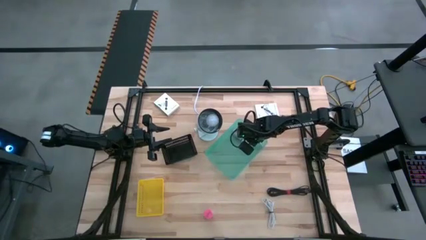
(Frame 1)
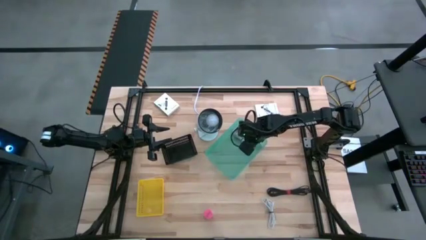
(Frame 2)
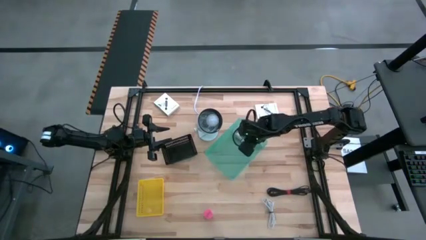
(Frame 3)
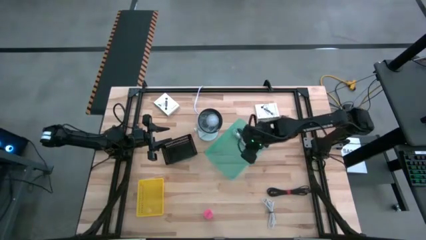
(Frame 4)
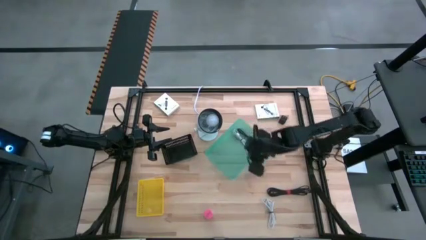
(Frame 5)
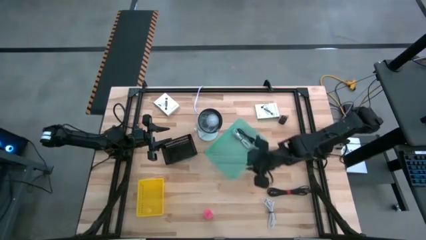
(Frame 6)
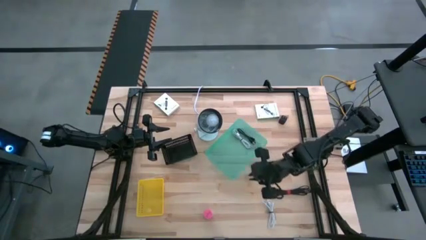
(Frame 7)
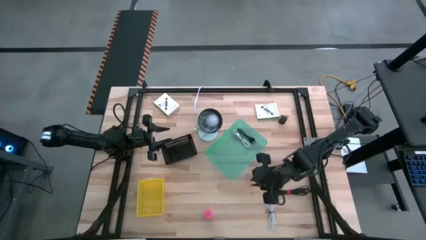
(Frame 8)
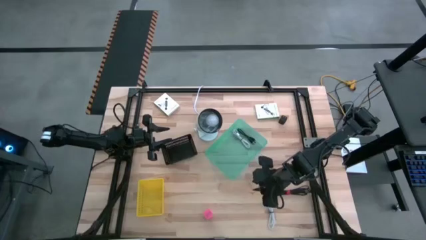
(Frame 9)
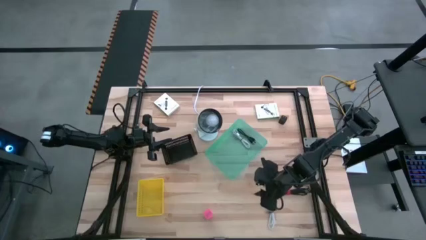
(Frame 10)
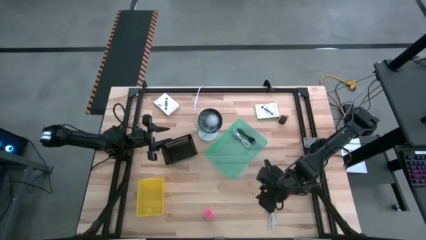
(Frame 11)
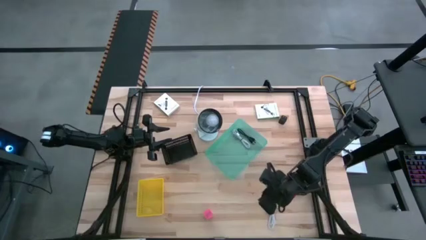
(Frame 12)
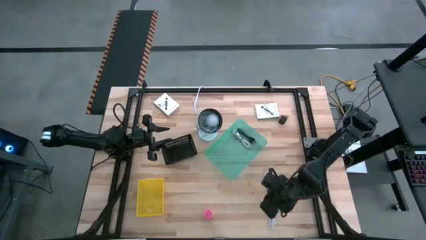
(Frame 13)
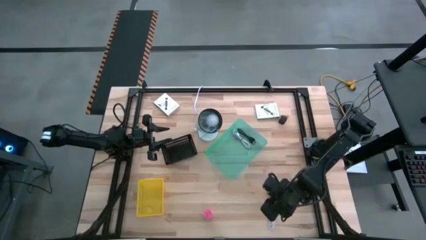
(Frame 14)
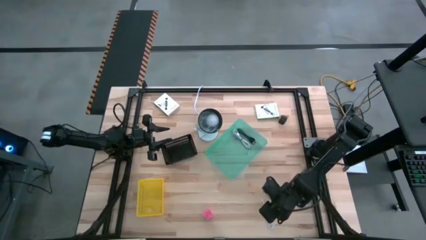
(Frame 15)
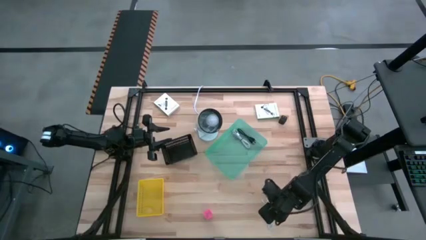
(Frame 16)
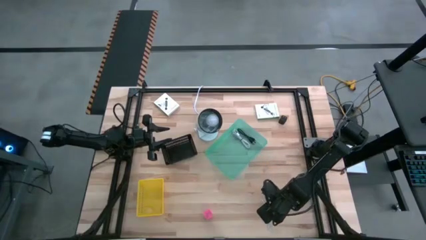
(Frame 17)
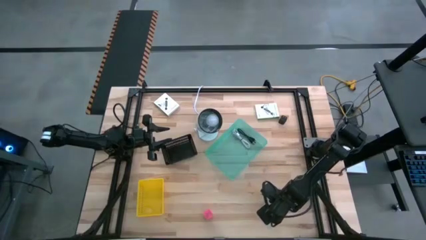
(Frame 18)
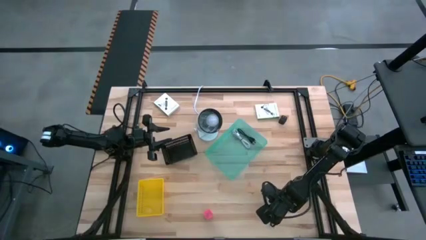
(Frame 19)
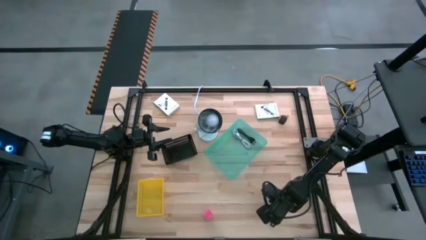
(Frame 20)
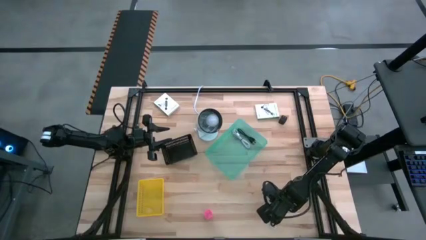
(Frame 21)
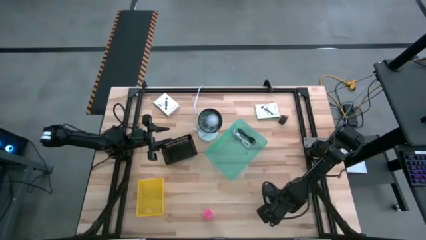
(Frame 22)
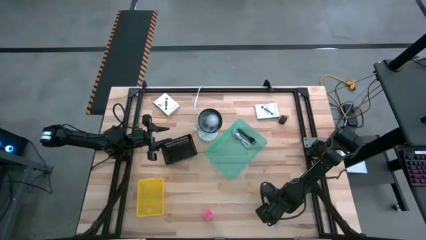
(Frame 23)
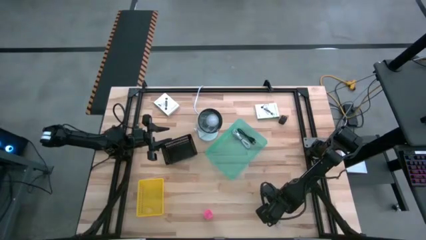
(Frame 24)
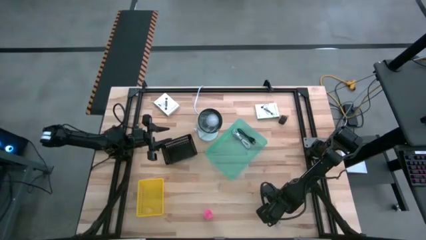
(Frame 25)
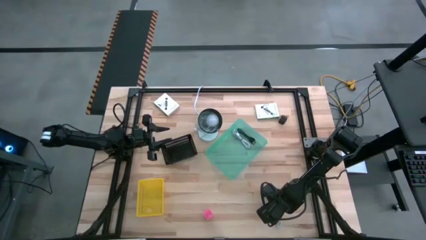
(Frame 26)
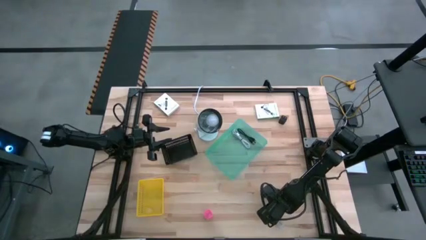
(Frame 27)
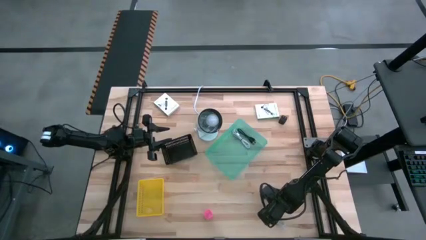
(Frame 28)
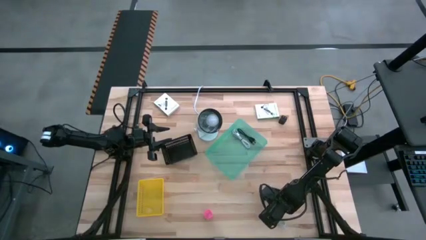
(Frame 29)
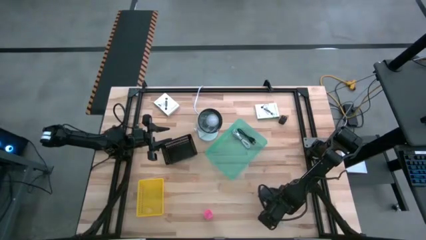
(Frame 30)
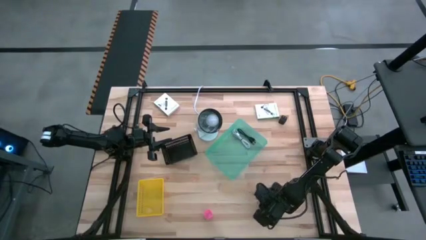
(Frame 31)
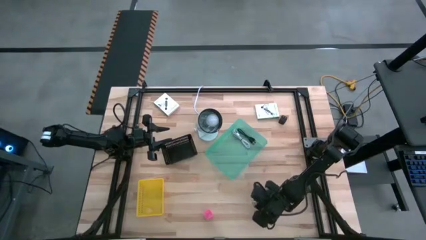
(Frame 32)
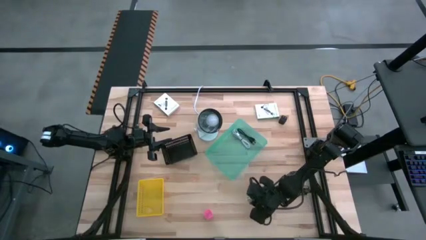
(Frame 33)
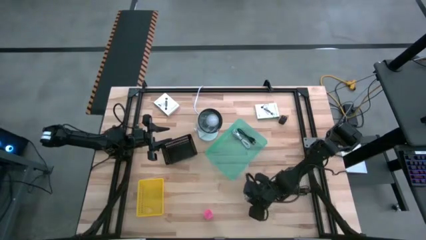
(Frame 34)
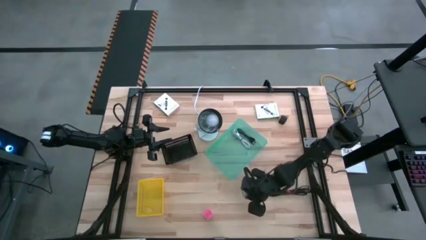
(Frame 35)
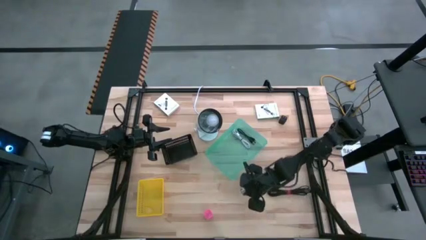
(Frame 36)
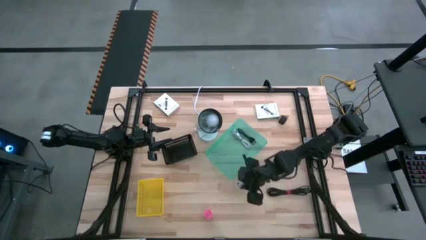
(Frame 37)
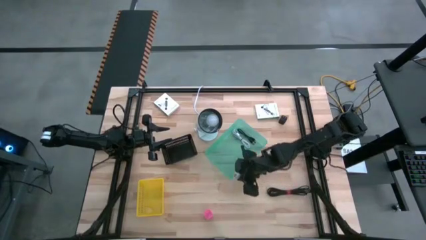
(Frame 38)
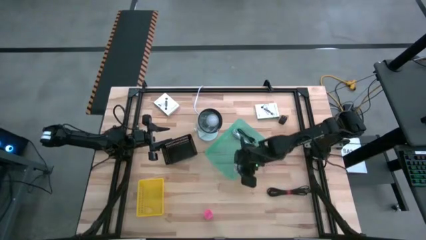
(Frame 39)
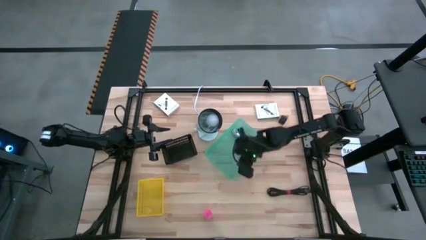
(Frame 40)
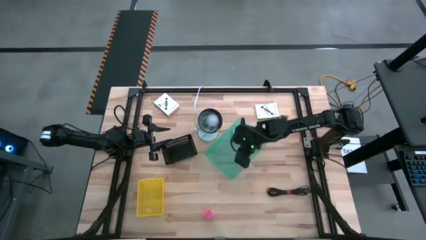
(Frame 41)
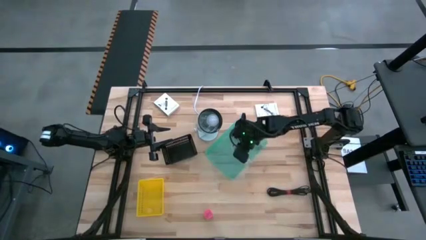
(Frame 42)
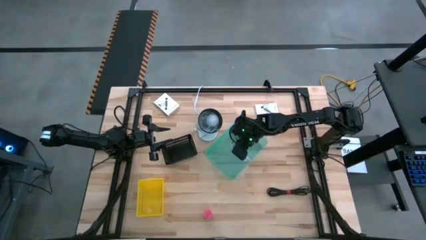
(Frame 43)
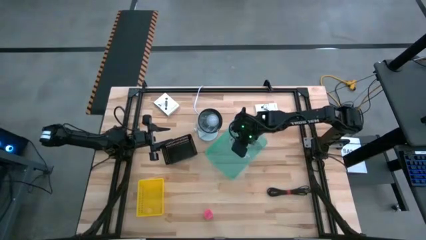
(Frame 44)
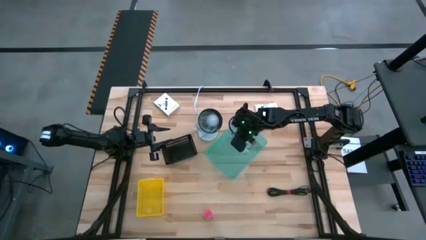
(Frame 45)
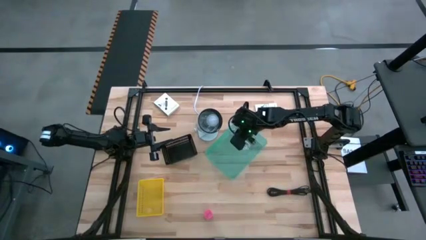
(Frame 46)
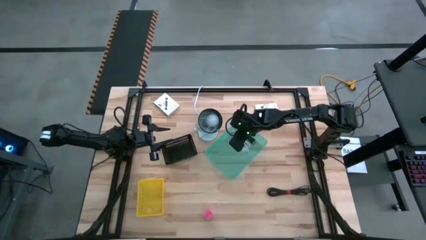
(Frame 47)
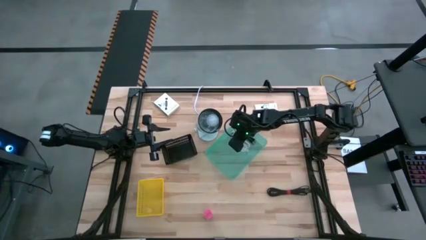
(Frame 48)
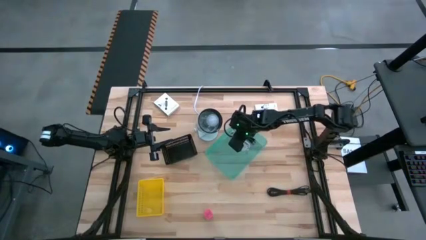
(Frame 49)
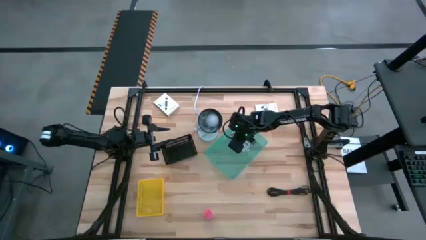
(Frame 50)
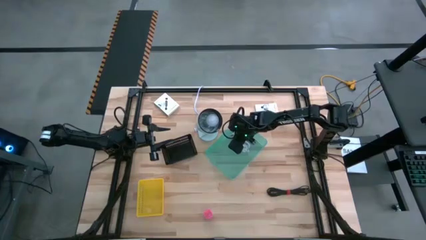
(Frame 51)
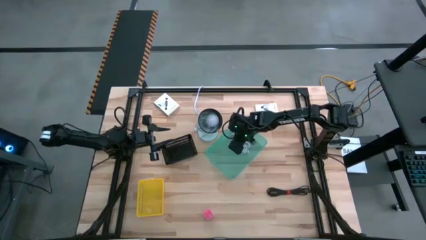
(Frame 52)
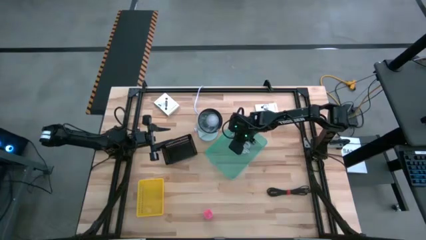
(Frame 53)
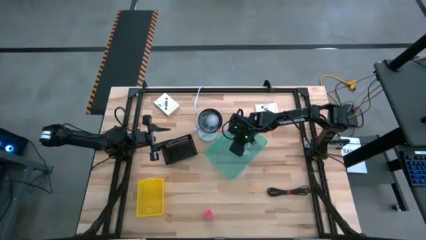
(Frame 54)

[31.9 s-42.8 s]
Task: Pick and place items into bin
Put the white charger cable into the green bin

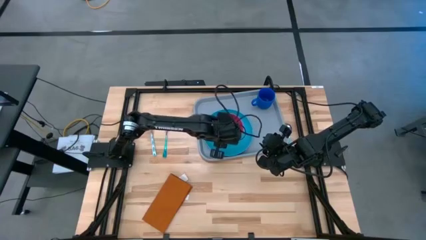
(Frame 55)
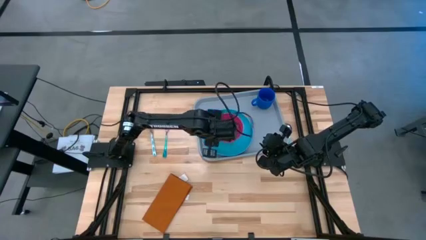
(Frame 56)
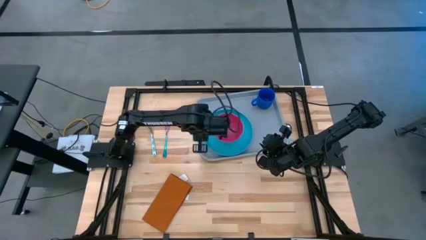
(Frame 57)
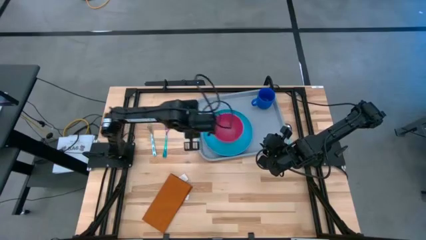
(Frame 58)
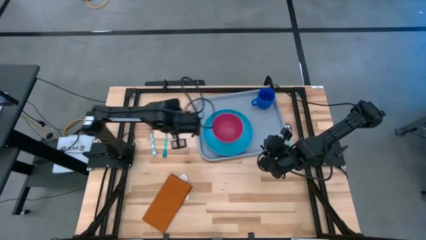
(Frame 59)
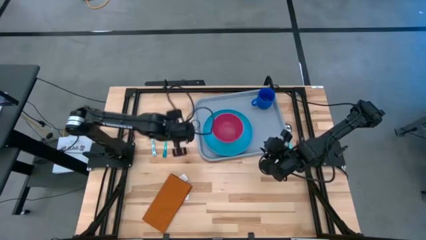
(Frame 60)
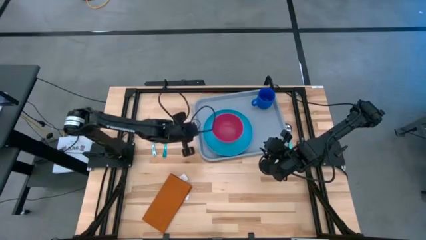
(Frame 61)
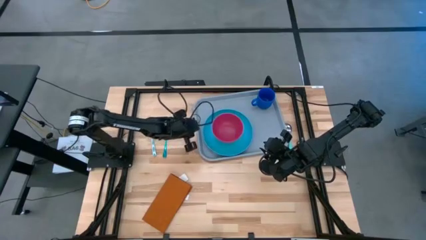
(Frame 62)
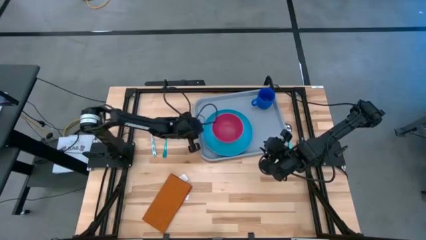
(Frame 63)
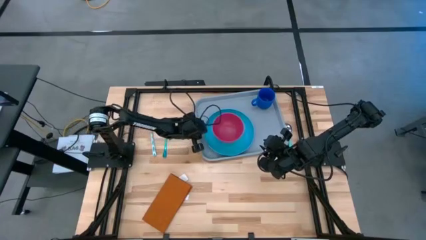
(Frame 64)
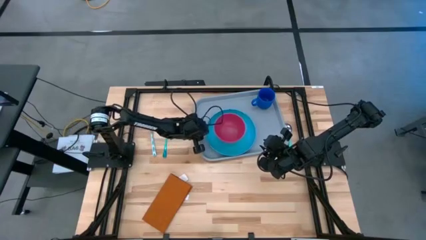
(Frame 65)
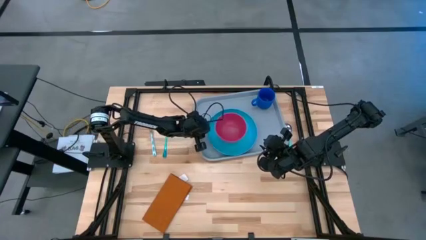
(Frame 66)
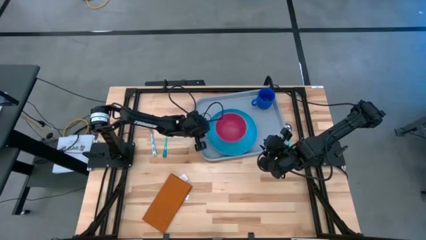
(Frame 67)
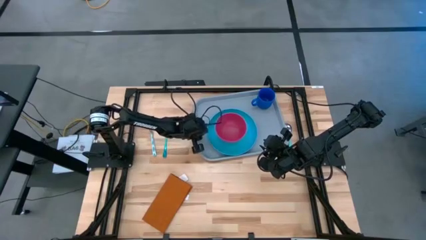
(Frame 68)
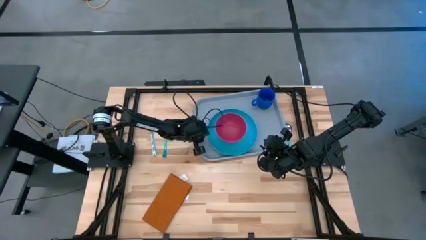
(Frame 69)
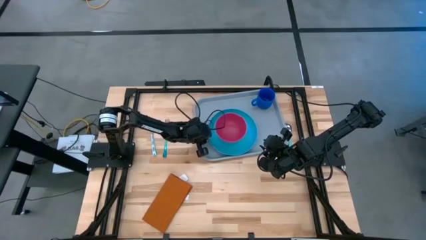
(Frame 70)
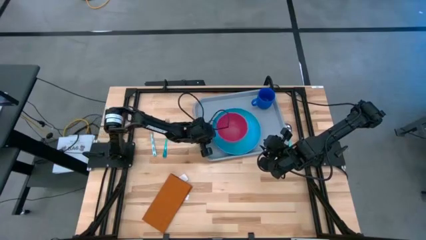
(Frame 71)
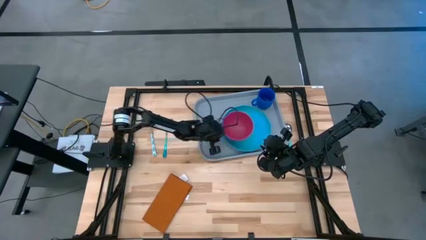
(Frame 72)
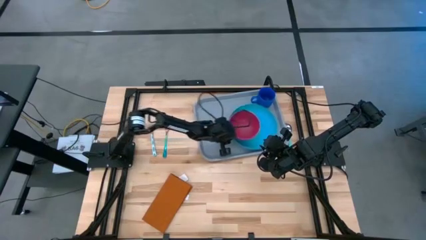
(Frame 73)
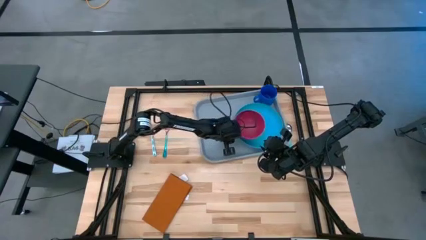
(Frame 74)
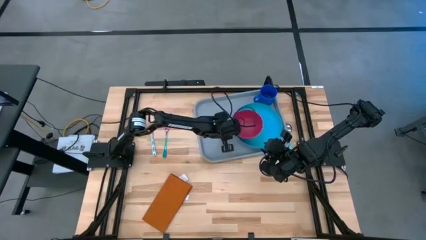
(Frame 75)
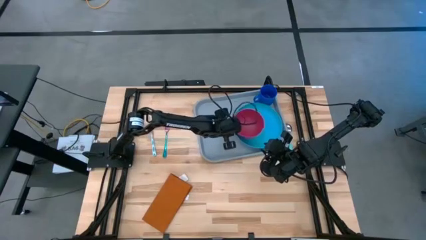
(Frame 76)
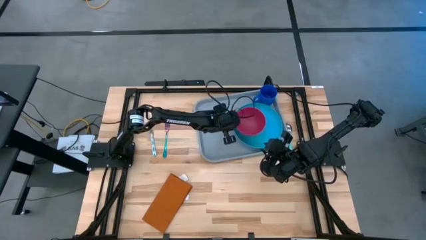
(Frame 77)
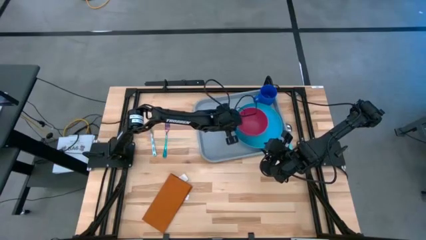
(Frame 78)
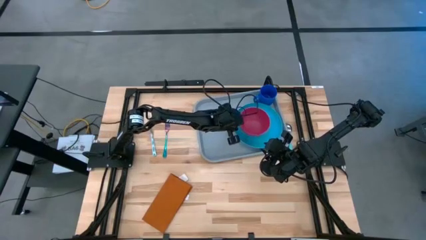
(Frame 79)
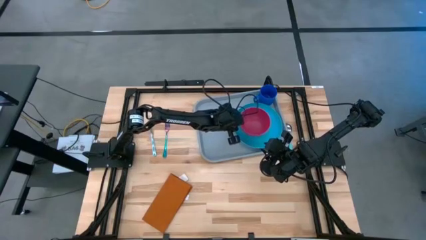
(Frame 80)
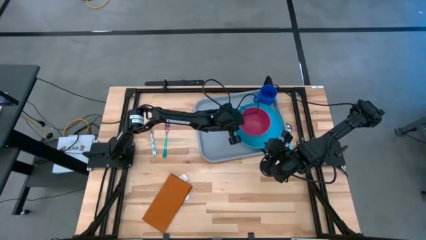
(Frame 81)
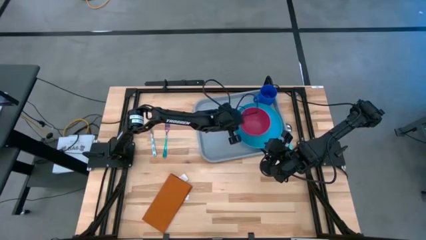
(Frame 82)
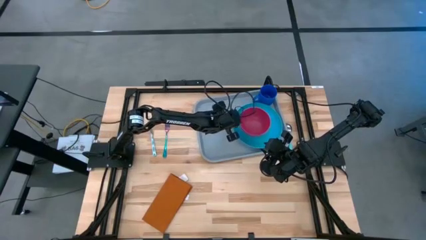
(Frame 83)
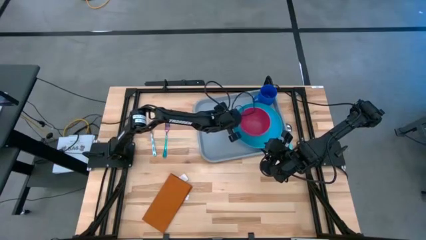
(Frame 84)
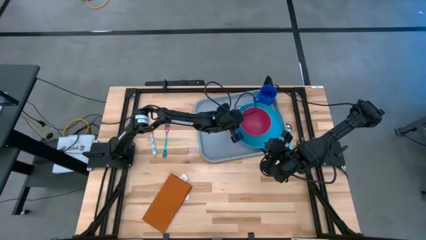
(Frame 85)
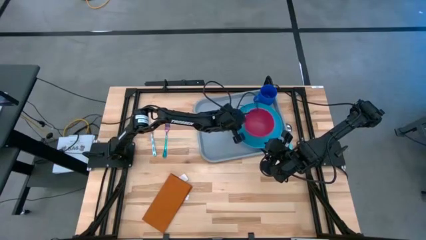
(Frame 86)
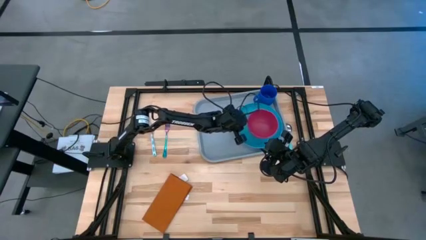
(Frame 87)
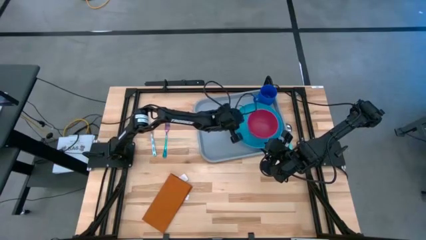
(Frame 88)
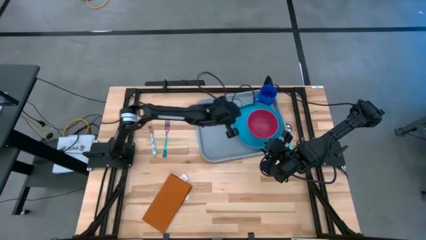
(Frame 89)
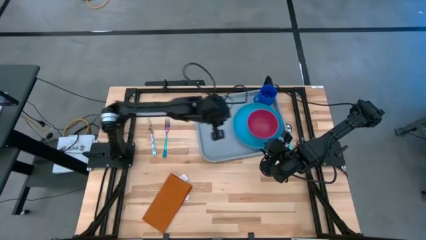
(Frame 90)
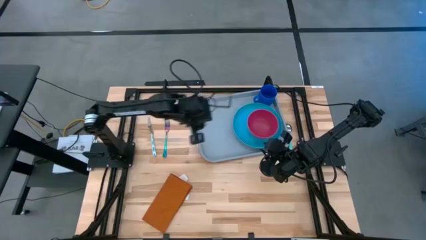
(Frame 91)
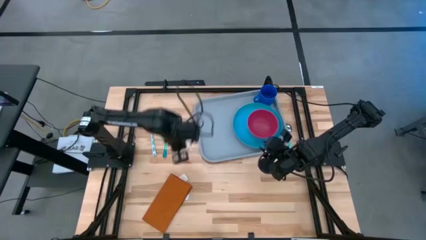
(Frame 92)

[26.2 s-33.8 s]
Task: Set up tray
Adjust the blue plate and bowl on the gray serving tray
